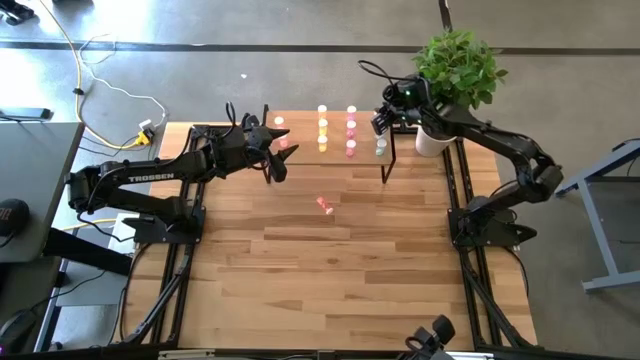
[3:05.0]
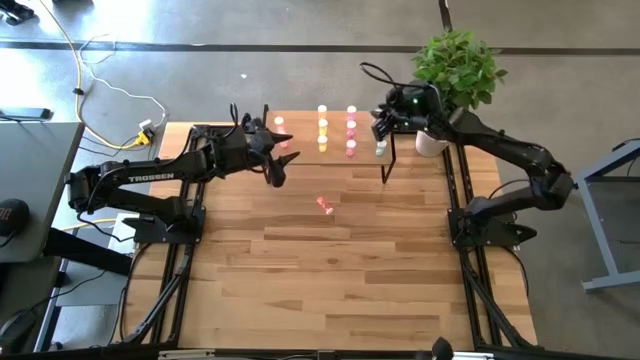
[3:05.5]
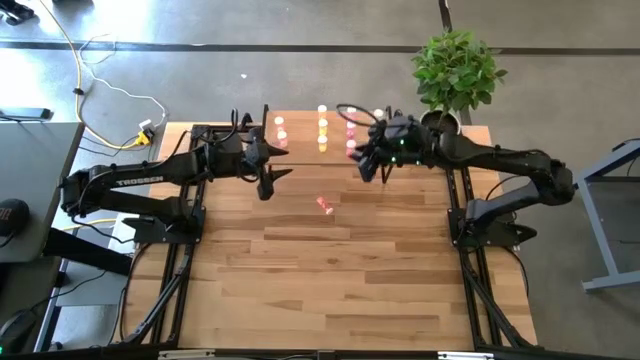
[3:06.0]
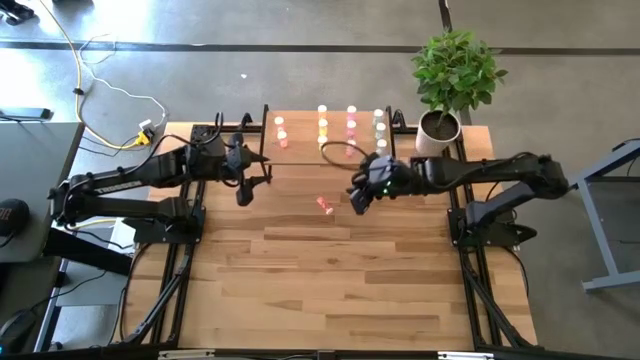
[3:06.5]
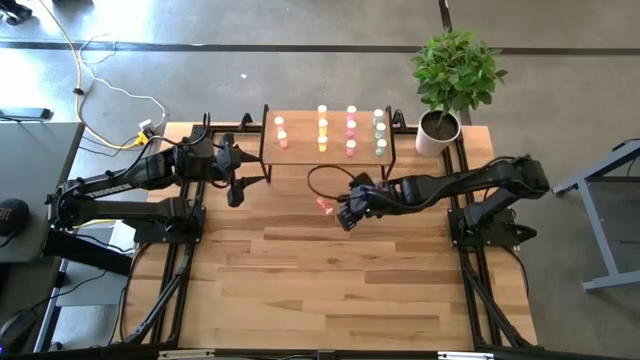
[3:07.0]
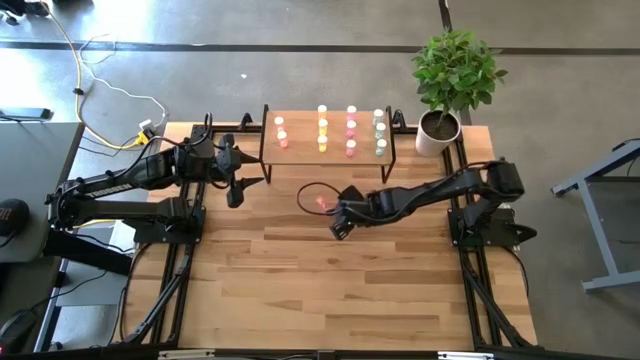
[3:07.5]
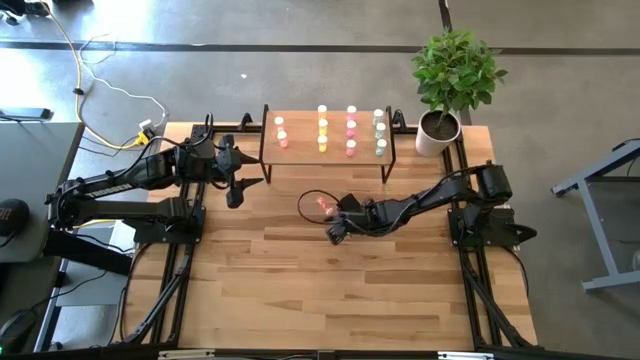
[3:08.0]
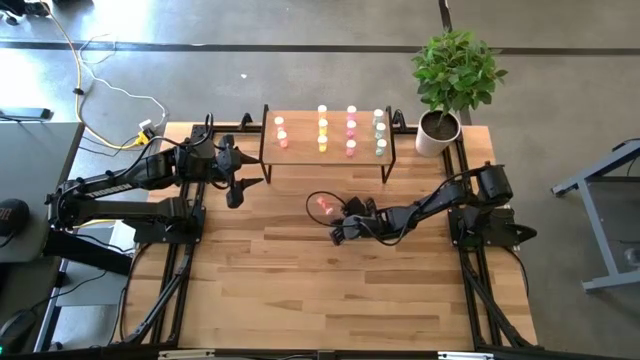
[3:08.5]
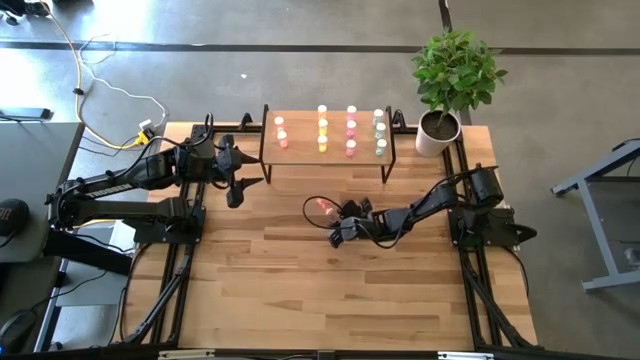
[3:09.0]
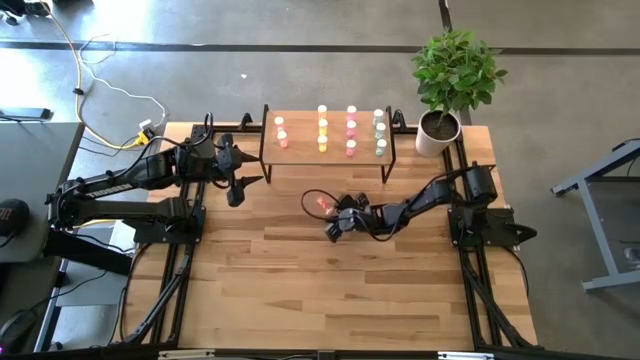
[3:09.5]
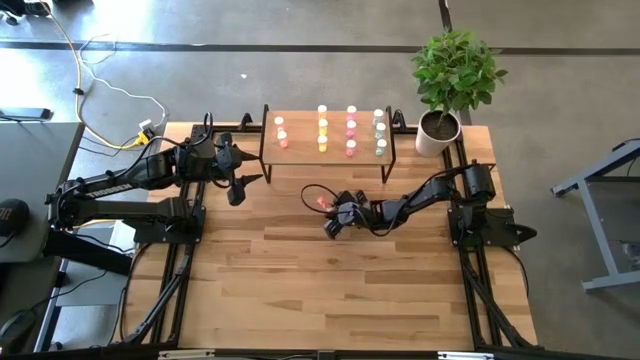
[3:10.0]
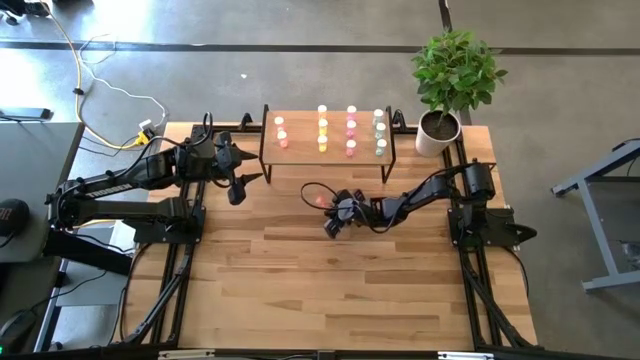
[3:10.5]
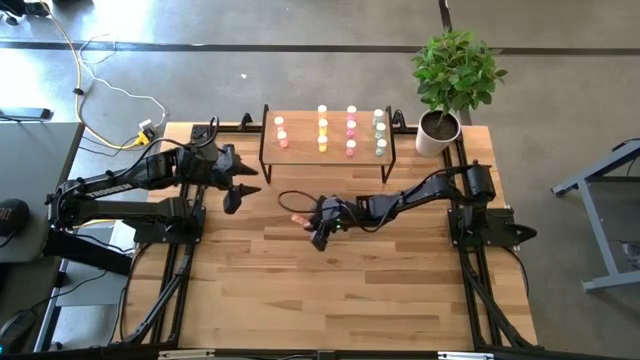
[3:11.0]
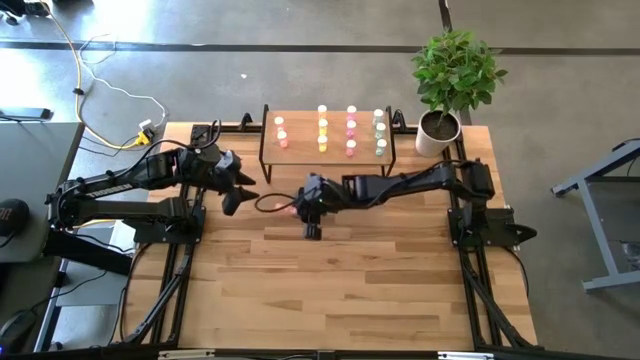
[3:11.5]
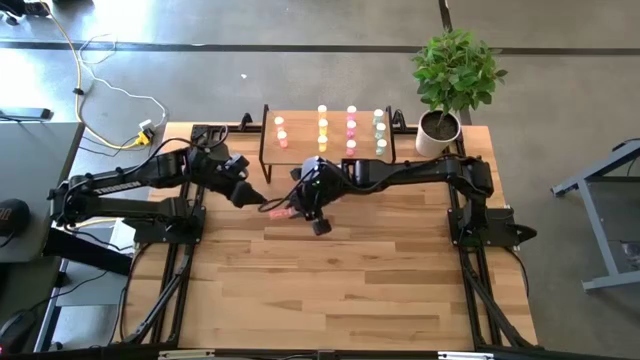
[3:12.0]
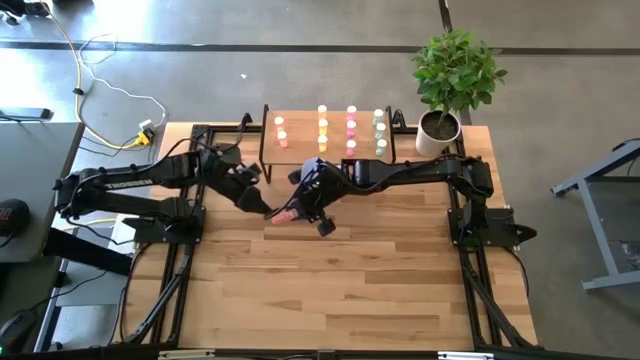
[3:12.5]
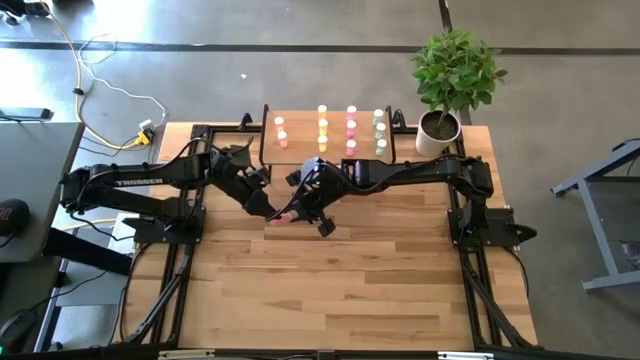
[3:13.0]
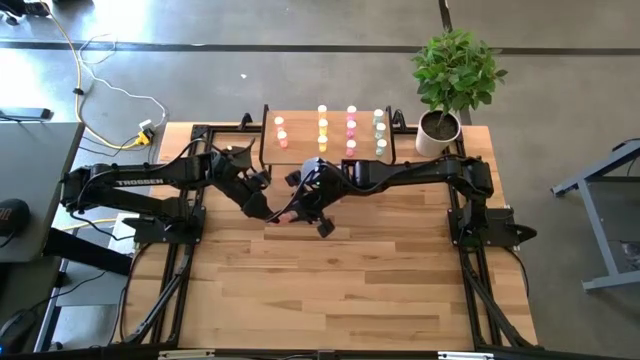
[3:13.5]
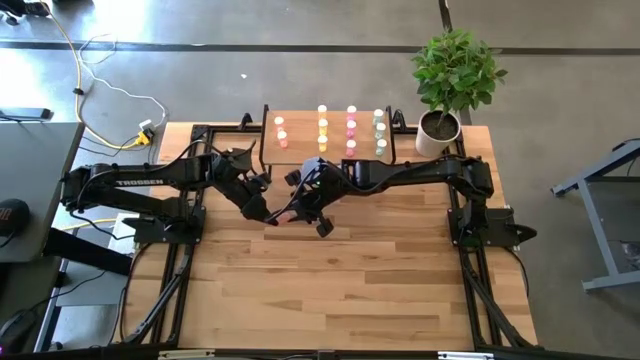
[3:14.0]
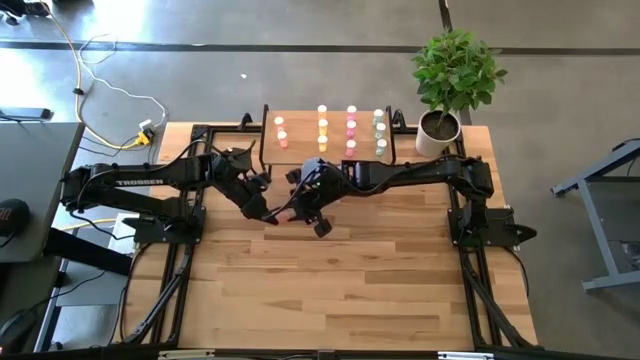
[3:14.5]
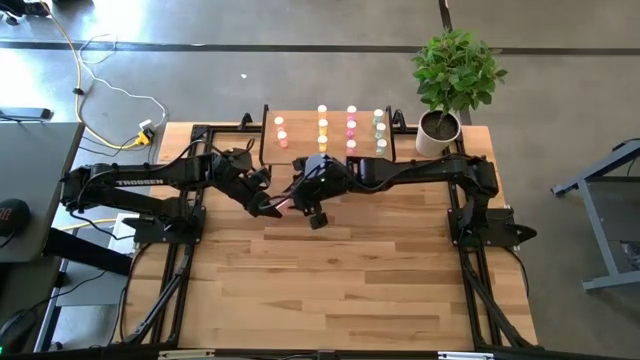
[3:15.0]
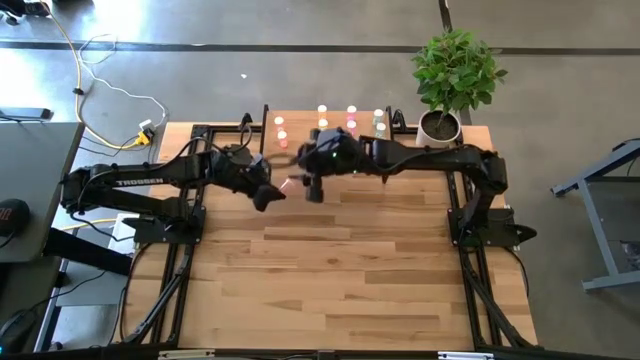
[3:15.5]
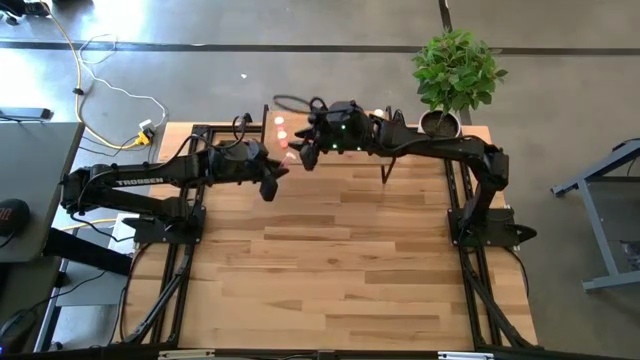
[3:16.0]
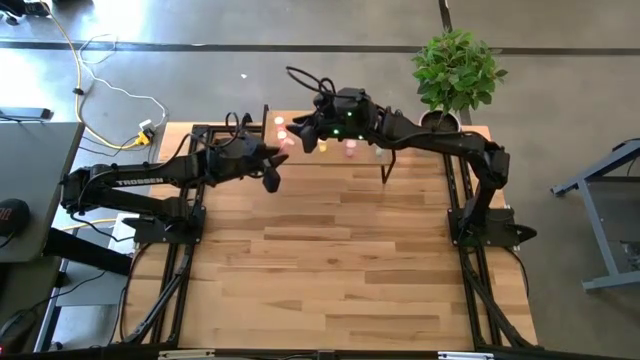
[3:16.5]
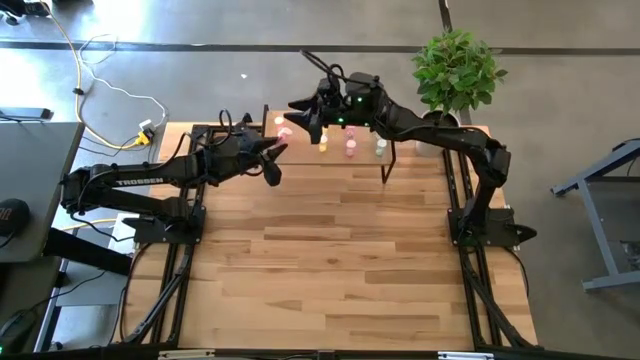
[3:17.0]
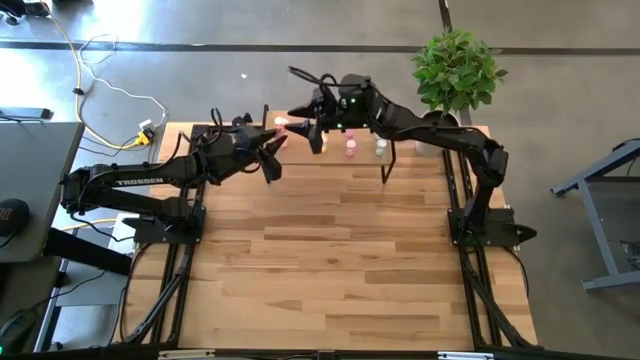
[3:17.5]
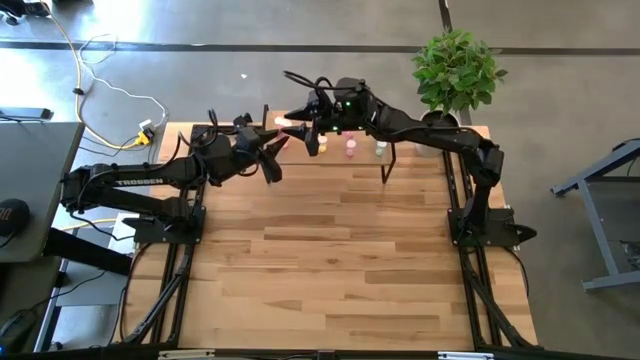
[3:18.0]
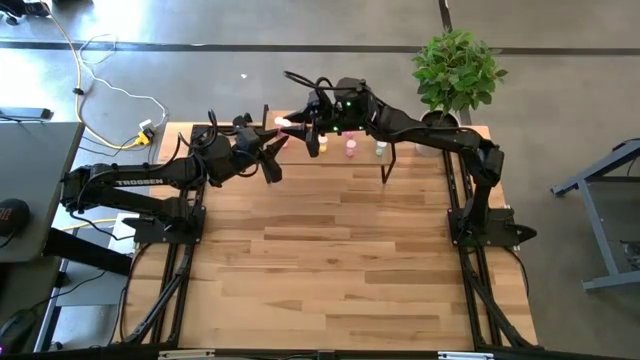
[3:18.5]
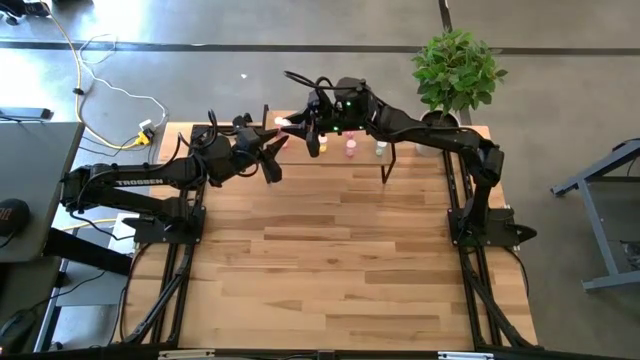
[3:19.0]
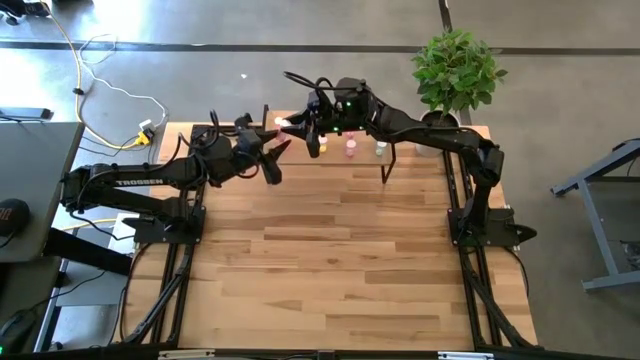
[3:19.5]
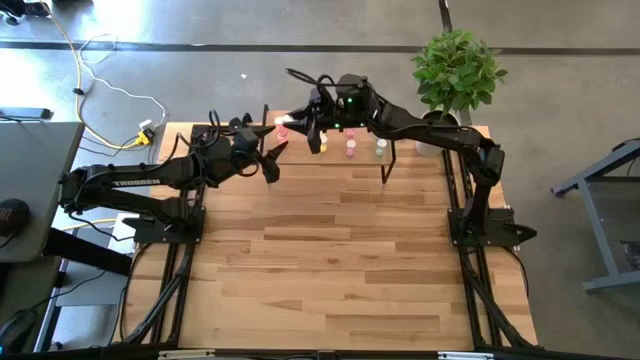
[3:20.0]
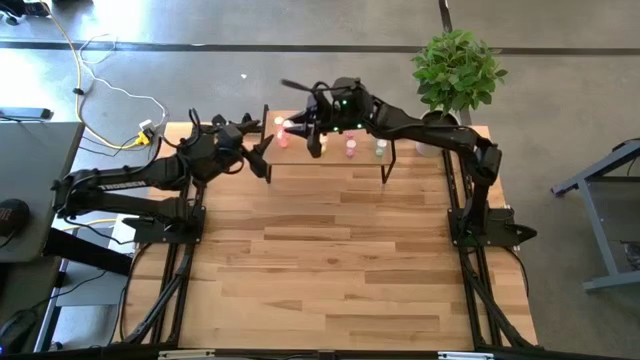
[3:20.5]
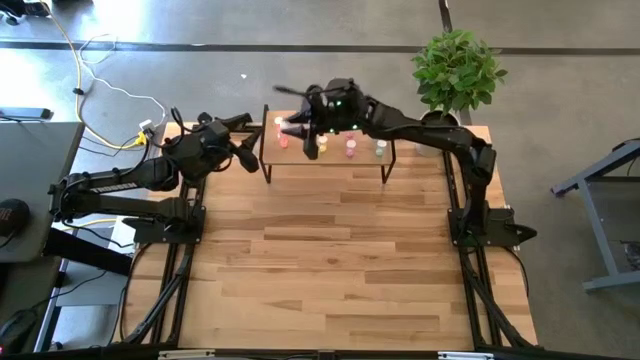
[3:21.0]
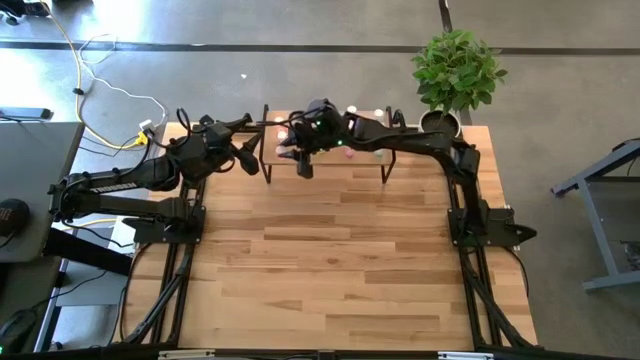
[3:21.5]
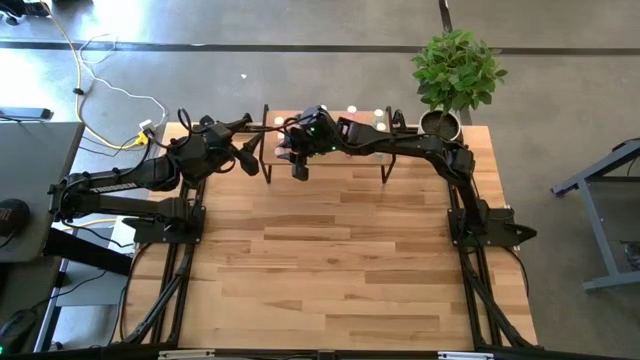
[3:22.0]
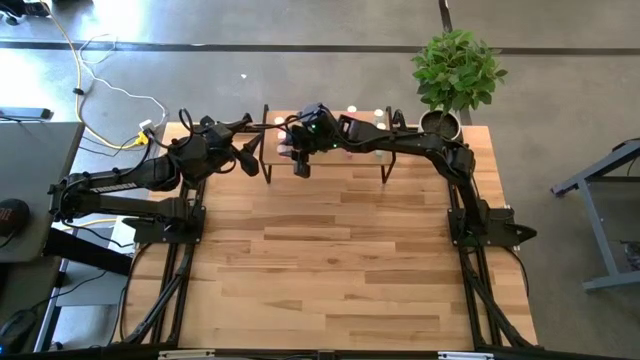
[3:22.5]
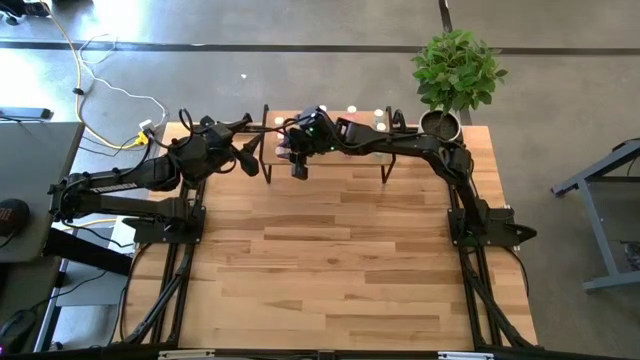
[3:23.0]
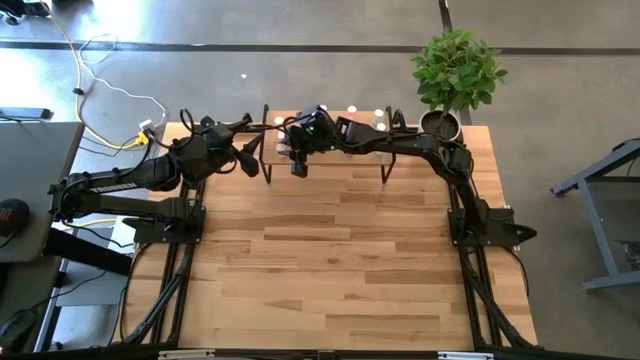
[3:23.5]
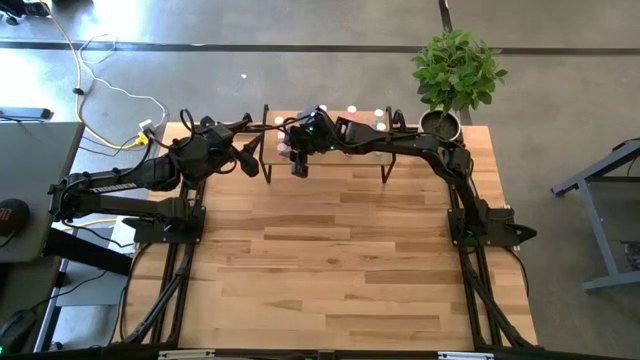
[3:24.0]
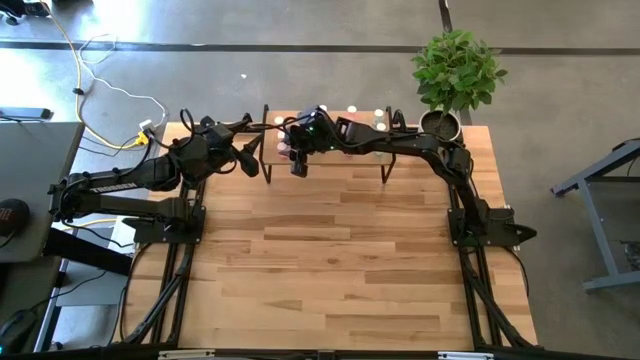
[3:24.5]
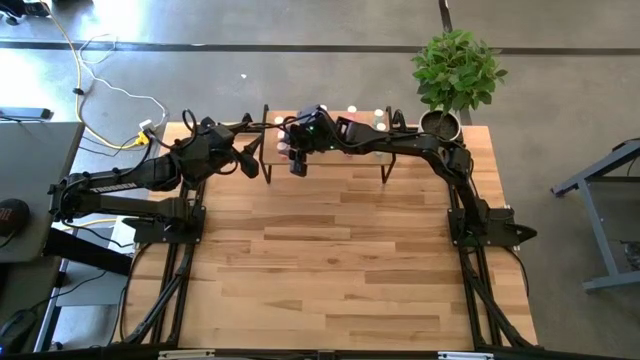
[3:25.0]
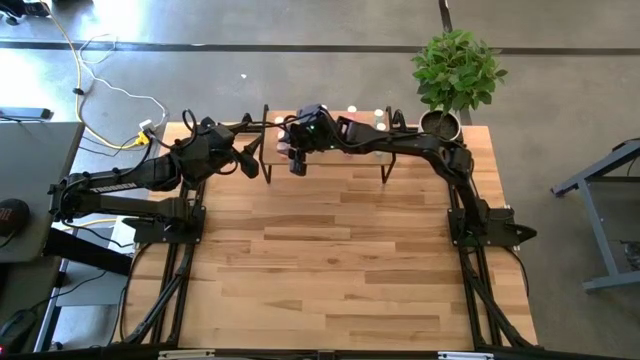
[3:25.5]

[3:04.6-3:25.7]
Task: Pick and place medicine bottles onto shelf by color
Put the pink pill bottle on the shelf aligned with the pink pill bottles
